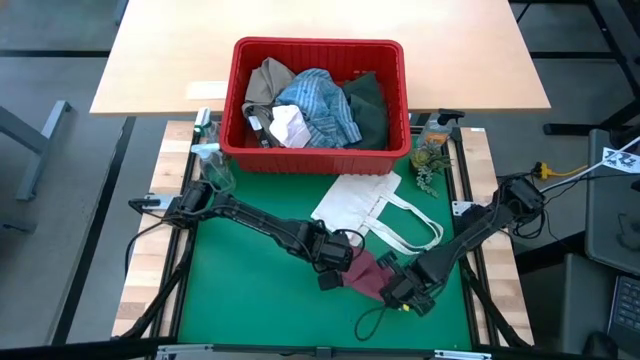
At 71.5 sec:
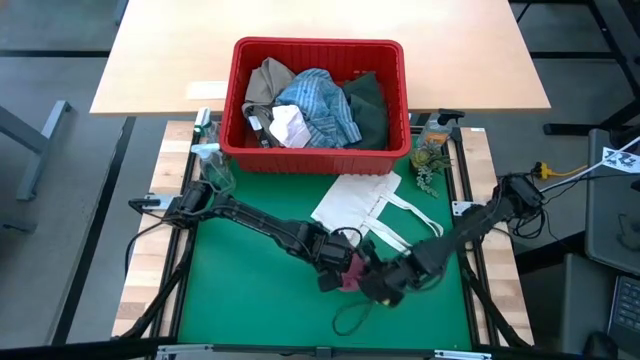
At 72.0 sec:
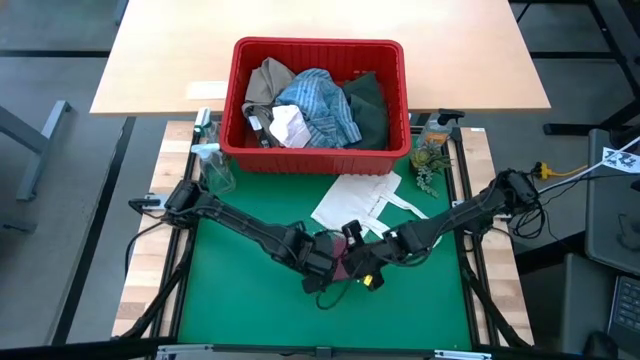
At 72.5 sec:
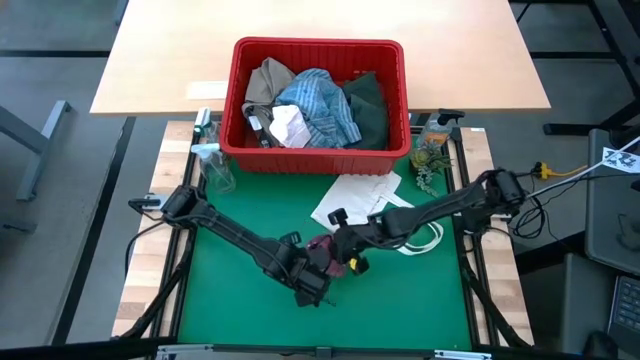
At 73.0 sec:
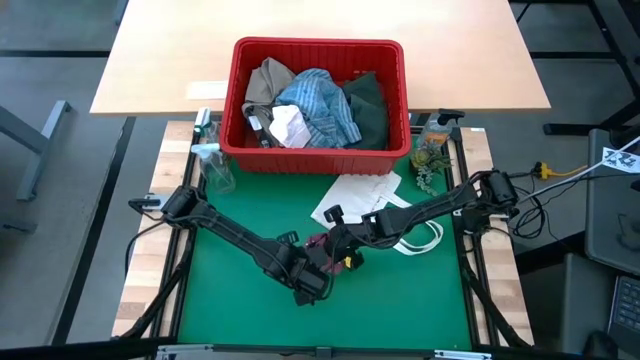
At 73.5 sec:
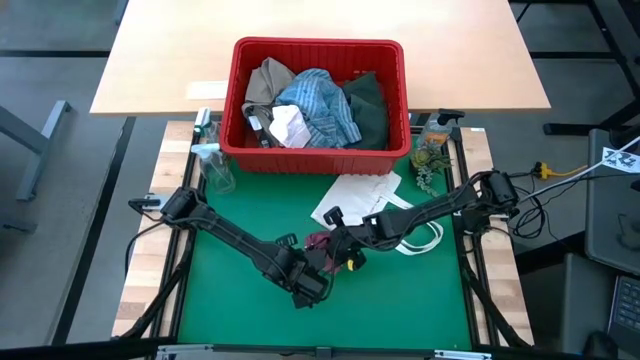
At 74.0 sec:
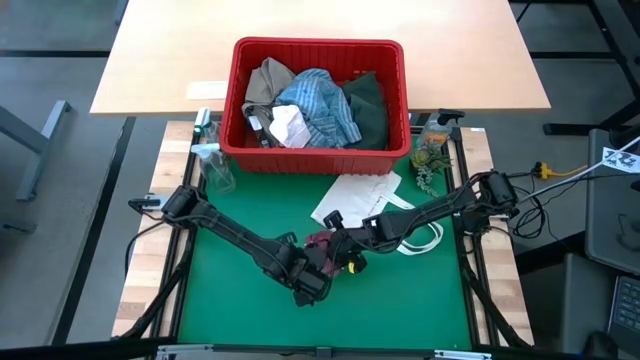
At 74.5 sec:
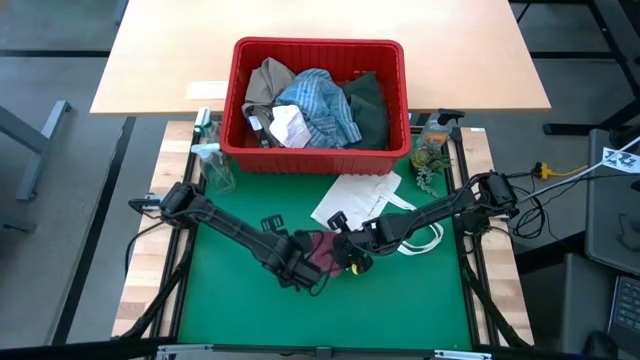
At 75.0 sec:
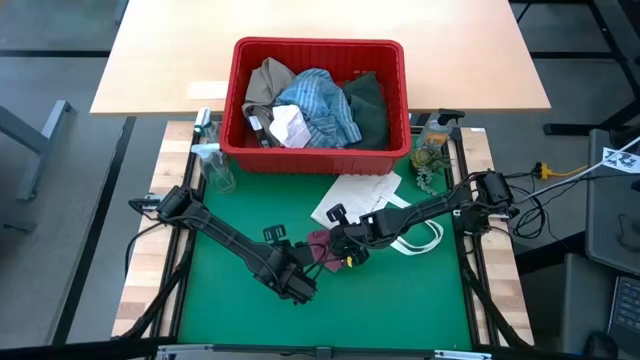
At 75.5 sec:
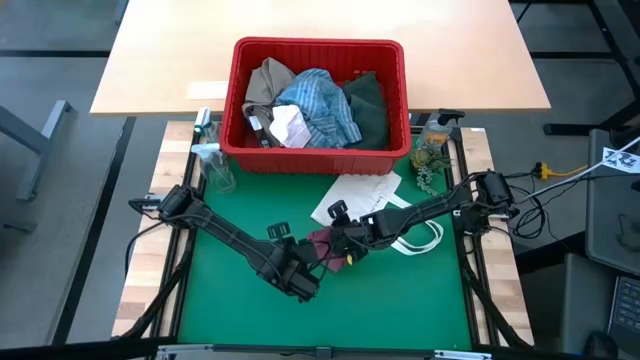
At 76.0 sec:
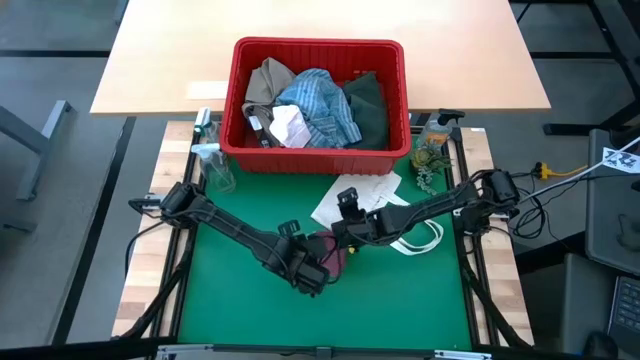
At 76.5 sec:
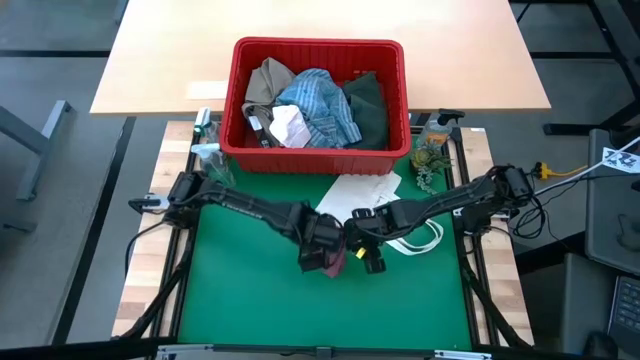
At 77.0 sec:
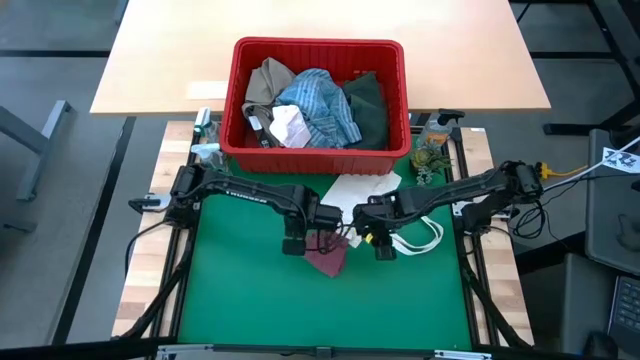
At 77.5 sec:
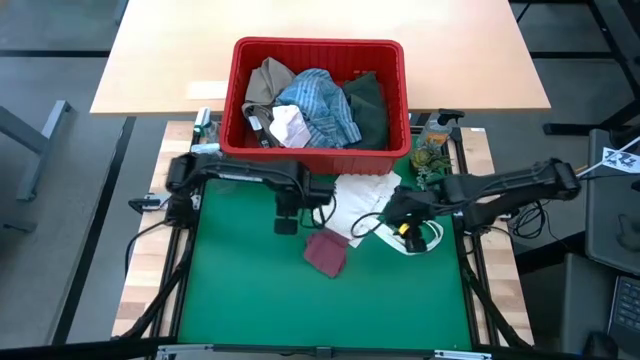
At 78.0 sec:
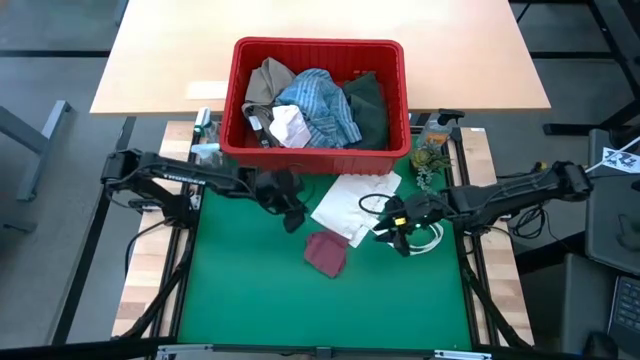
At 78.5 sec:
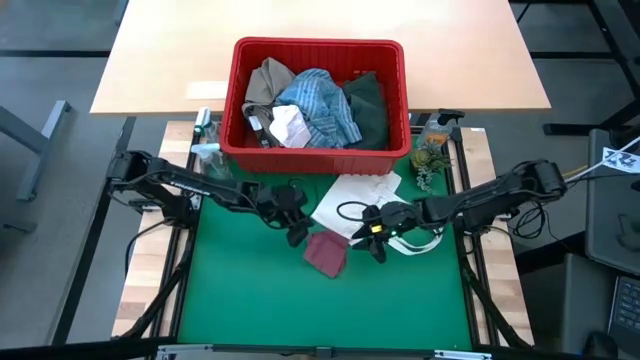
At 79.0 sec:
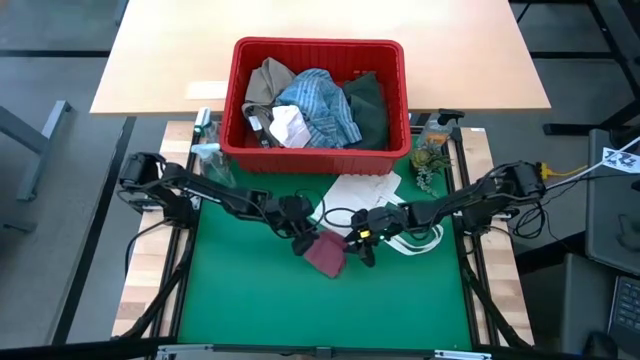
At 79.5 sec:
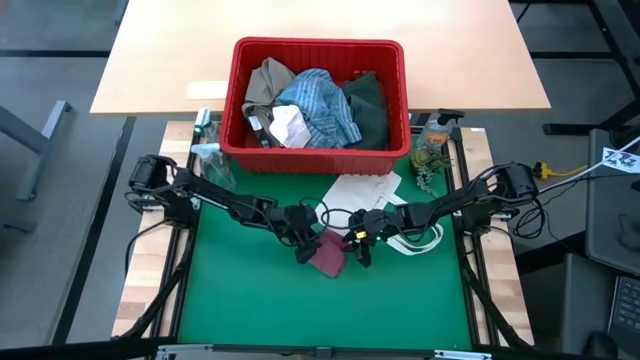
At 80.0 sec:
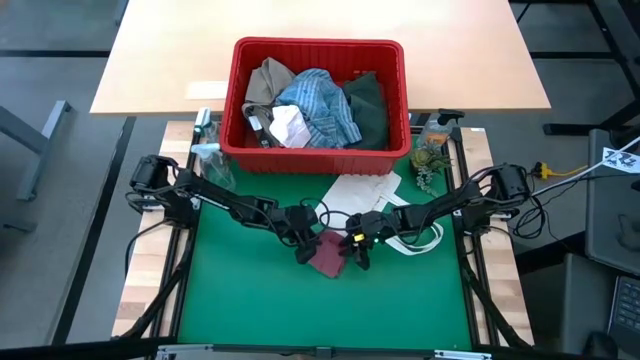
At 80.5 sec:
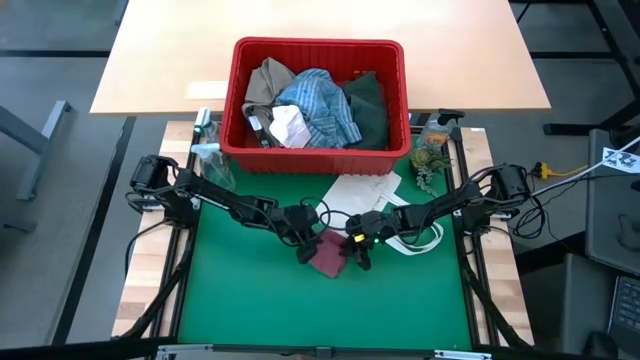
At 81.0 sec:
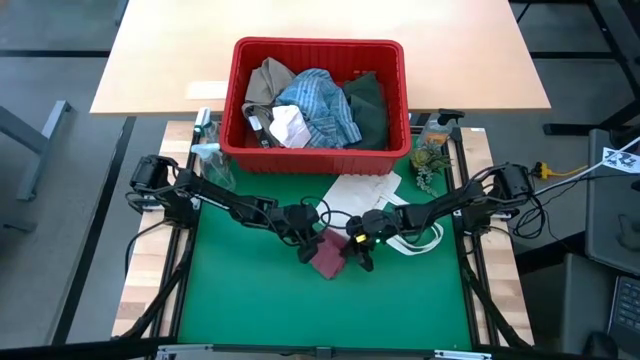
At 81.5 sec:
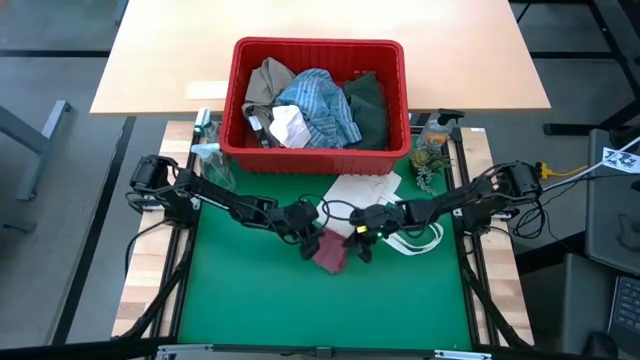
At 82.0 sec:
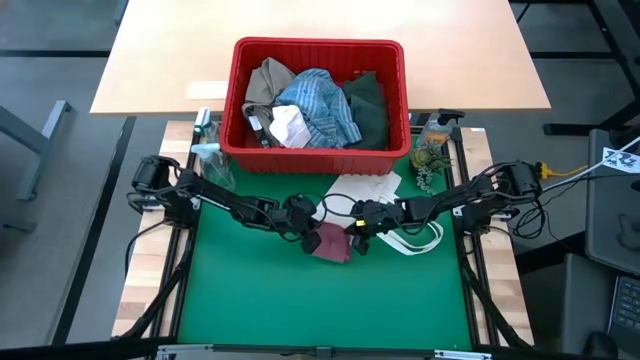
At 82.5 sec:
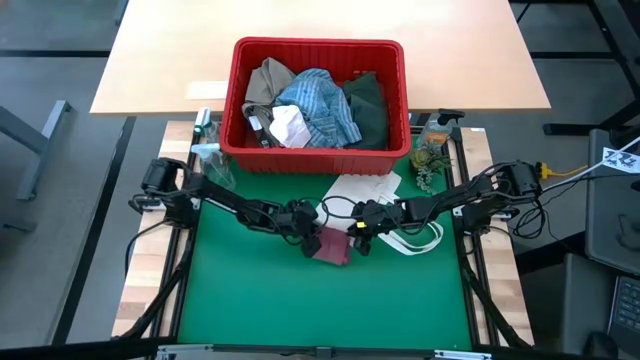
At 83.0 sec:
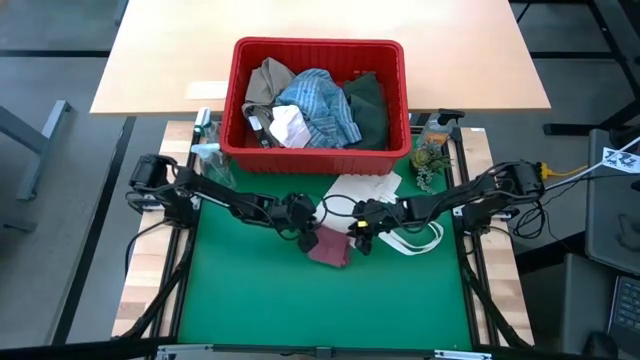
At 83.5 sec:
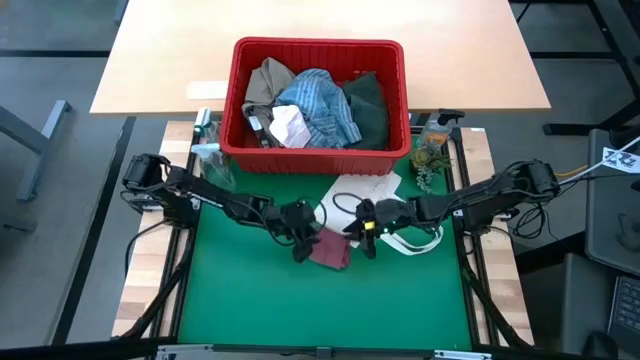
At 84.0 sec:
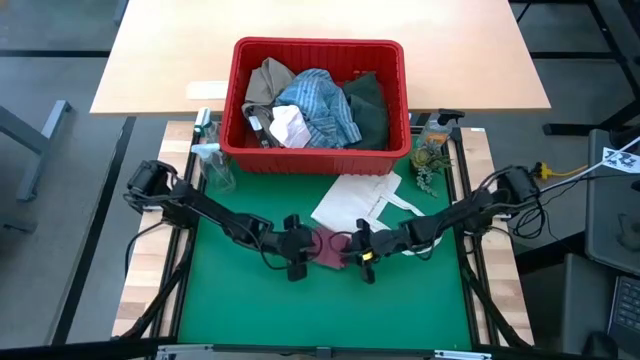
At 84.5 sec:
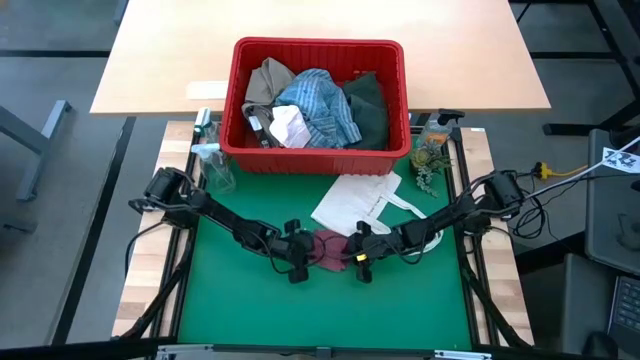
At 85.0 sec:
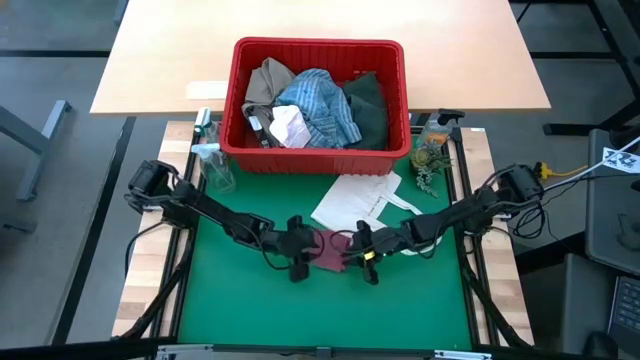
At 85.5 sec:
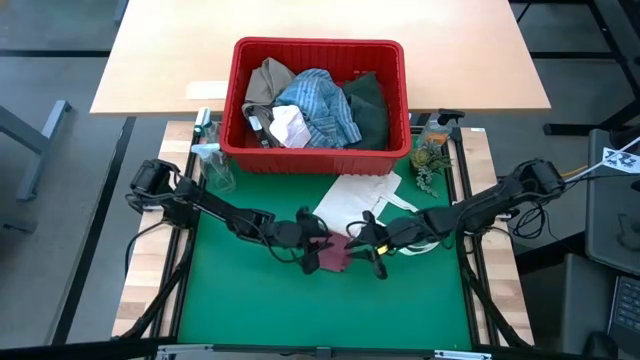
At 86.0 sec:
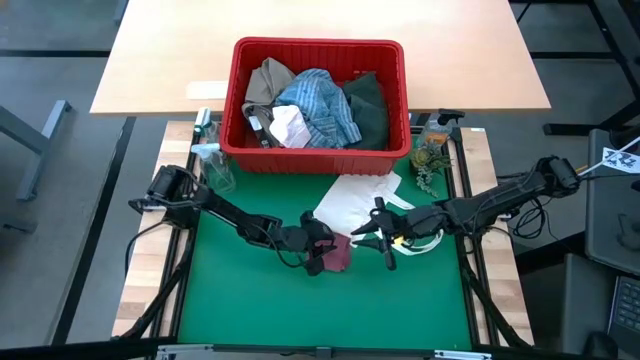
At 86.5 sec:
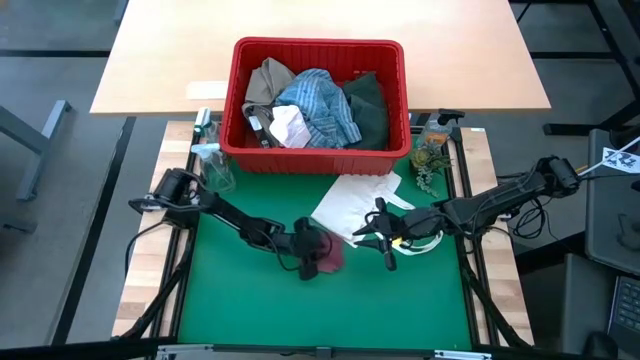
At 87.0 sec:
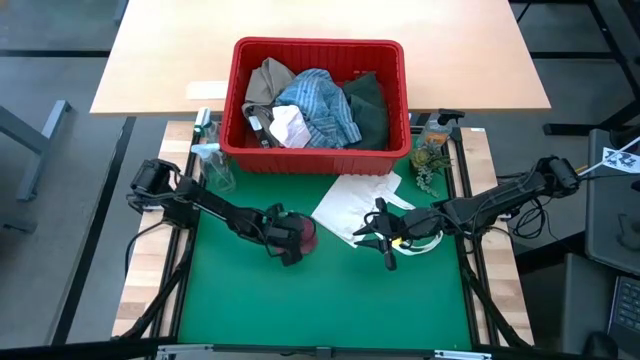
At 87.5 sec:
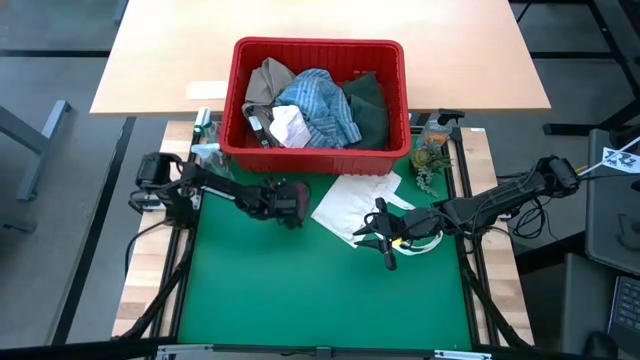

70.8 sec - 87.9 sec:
Task: Fold Laundry from Bin
Fold the pink underwear
